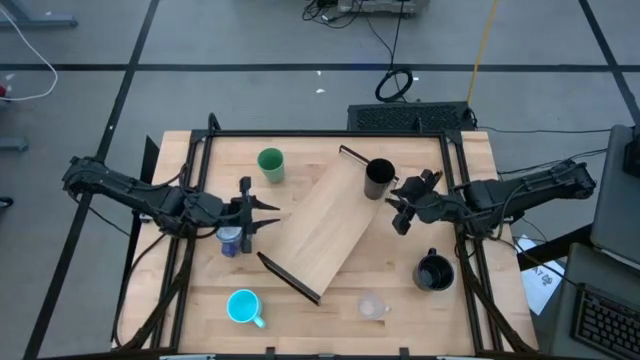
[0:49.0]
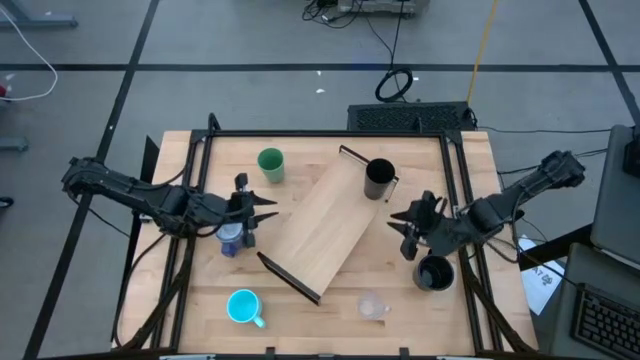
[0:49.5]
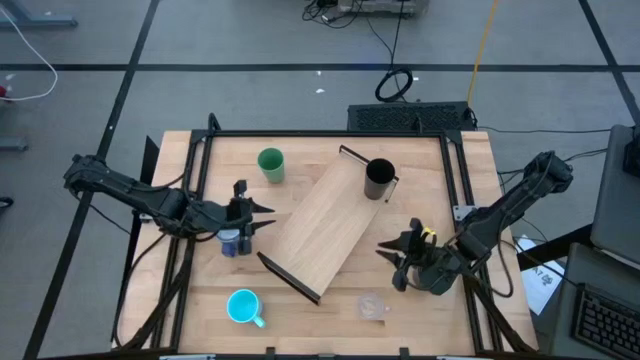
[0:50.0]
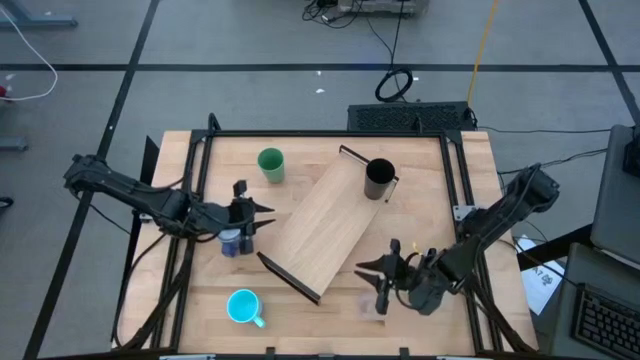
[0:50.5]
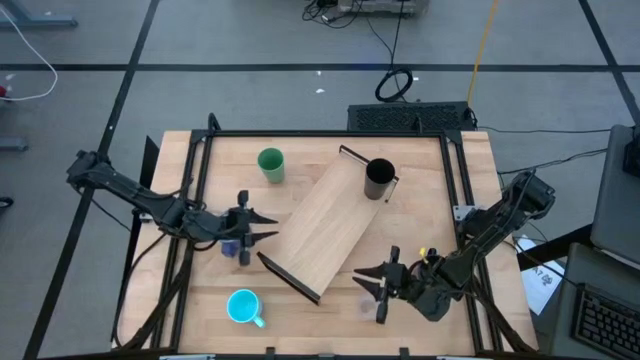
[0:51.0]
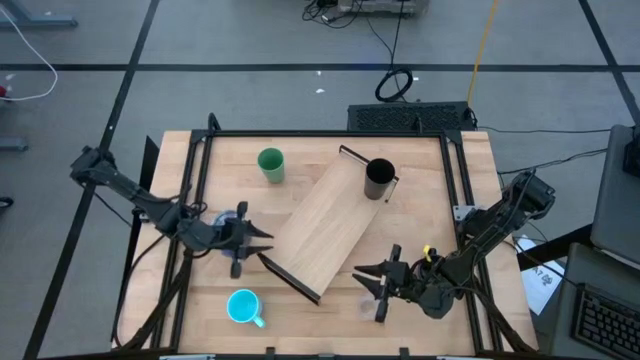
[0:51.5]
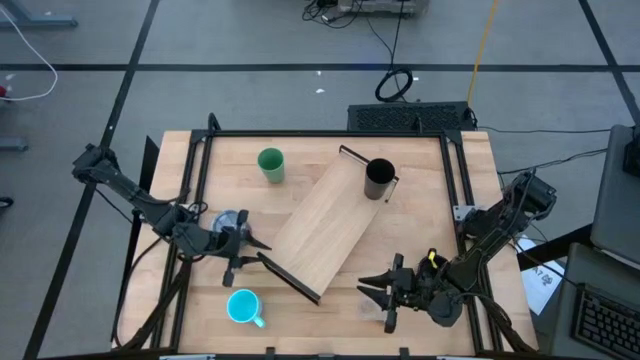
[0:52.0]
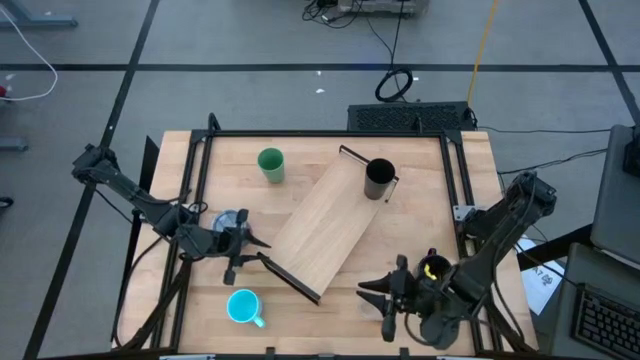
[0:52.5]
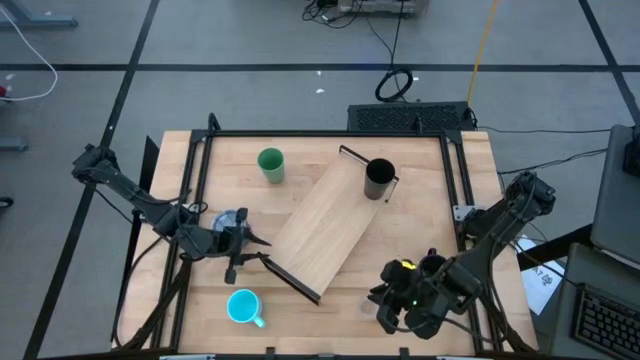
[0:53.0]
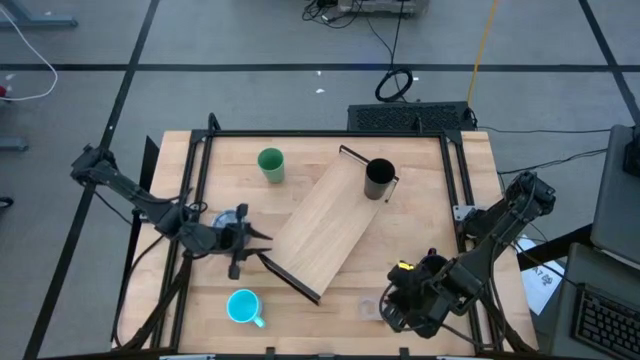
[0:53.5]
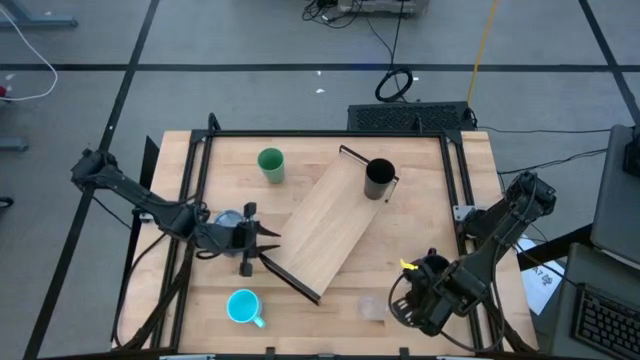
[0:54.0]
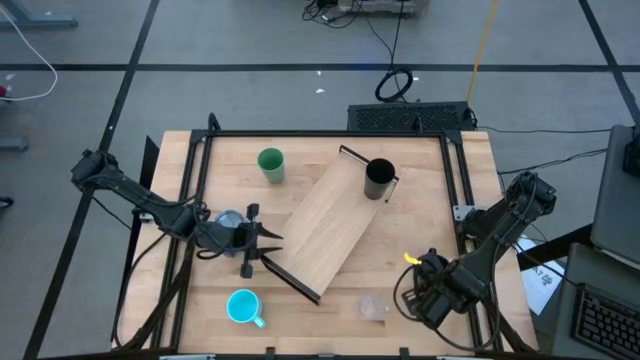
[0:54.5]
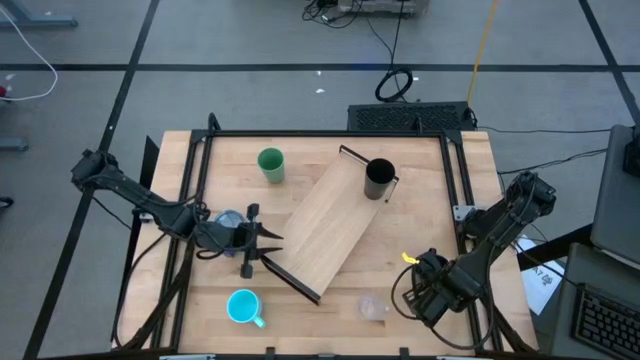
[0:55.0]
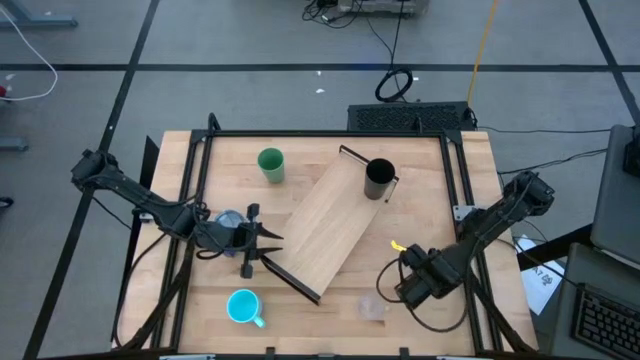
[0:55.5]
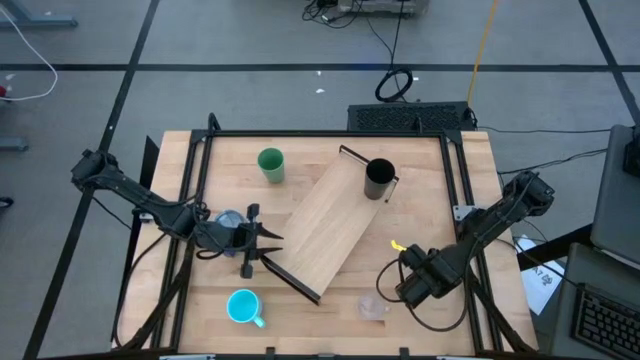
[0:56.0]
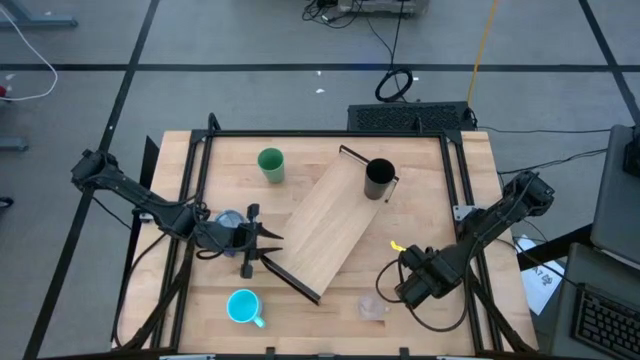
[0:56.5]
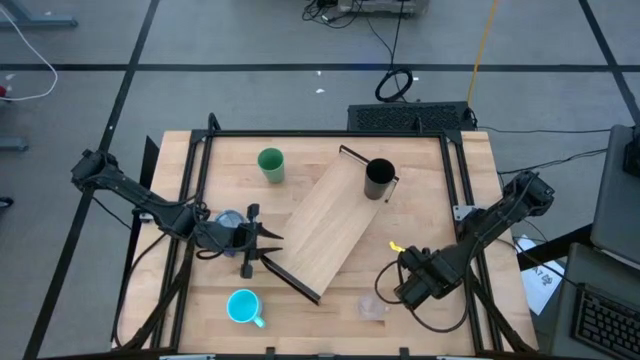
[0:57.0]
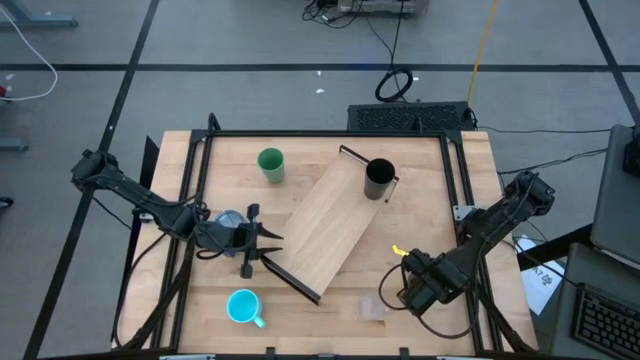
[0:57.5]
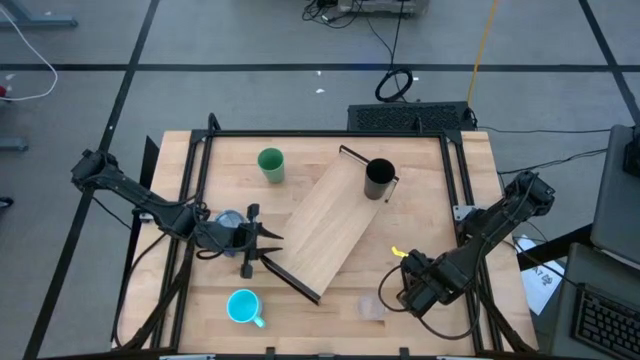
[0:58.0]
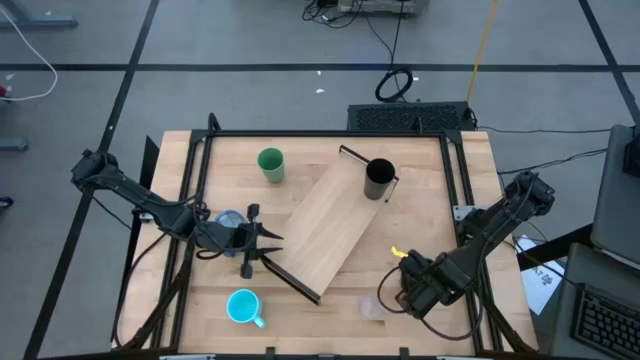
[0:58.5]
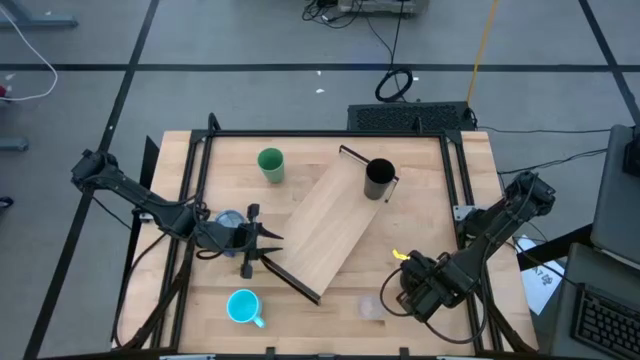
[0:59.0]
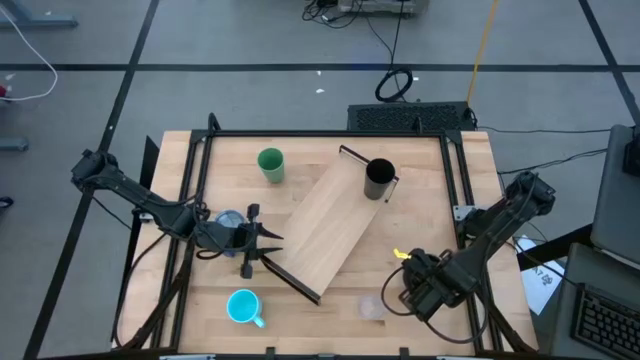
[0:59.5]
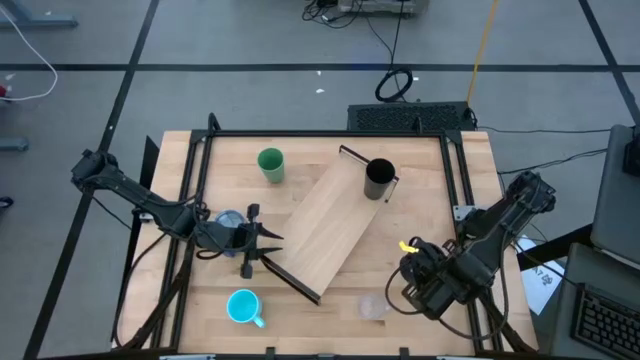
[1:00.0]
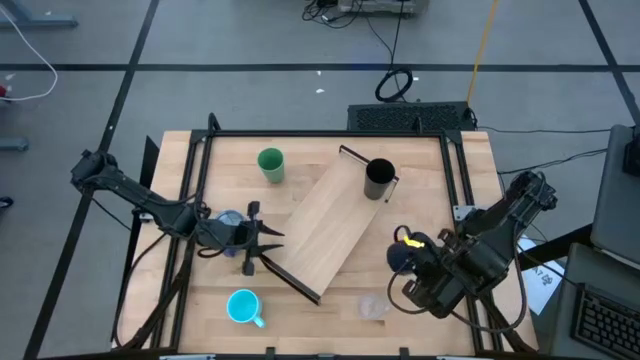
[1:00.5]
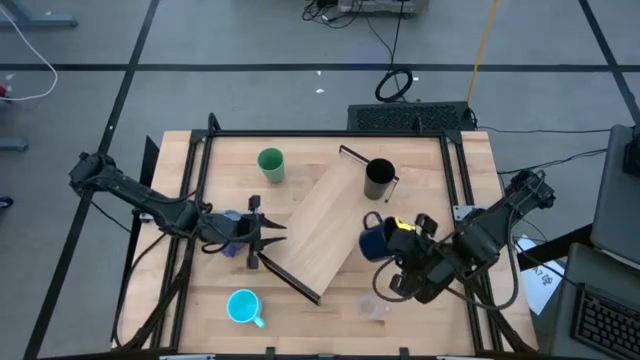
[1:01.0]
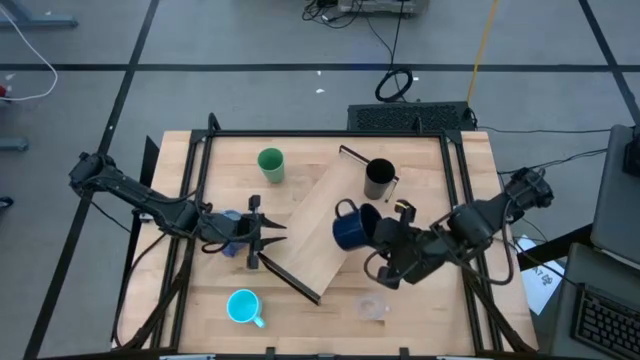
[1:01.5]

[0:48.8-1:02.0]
Task: Stack small to large cups/mugs on shelf
Put the dark blue cup on the shelf
